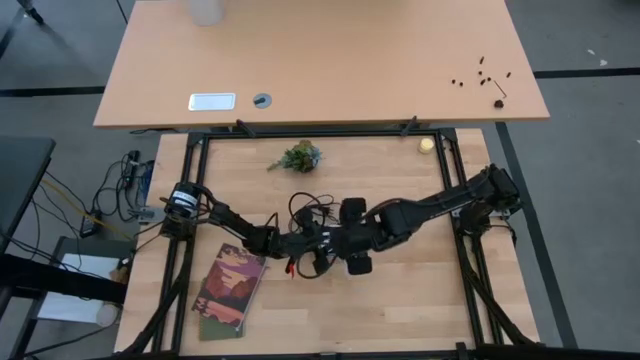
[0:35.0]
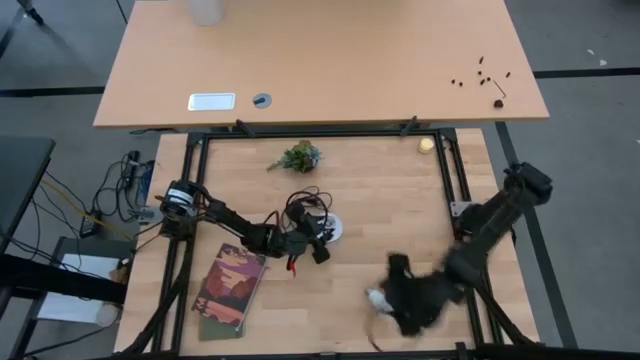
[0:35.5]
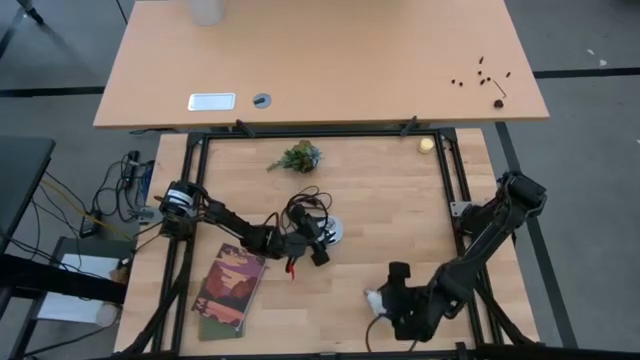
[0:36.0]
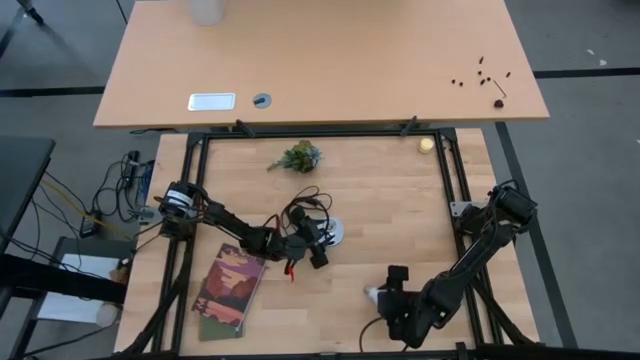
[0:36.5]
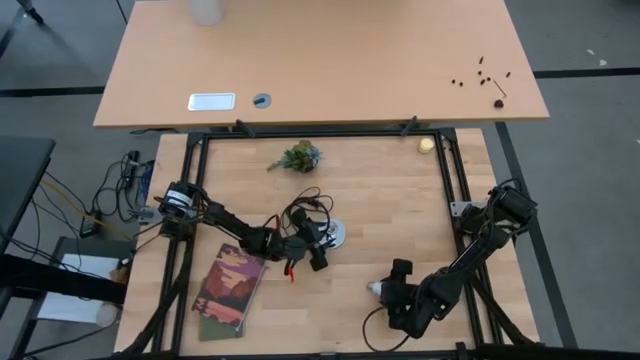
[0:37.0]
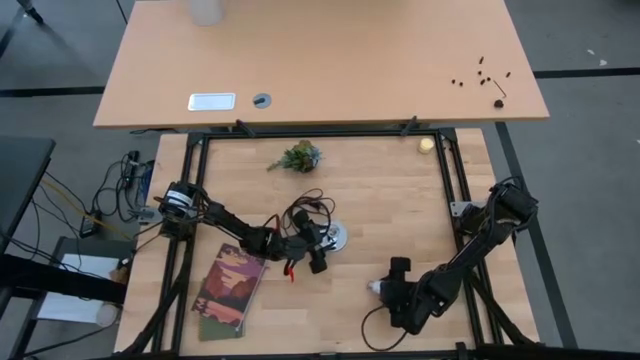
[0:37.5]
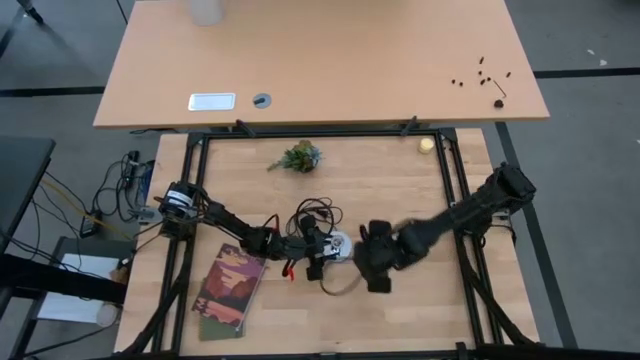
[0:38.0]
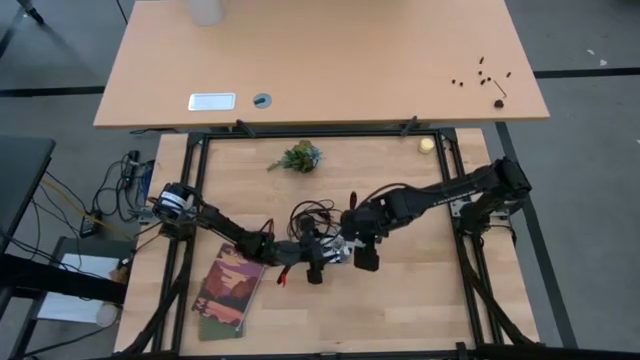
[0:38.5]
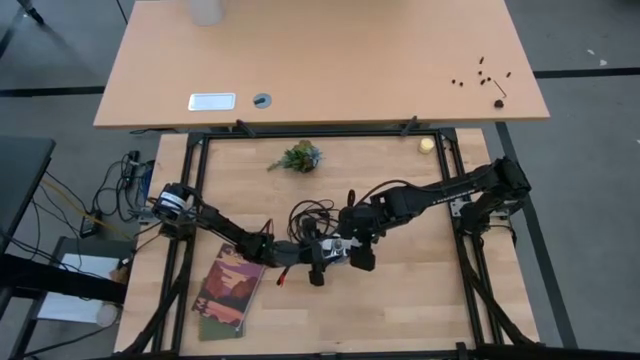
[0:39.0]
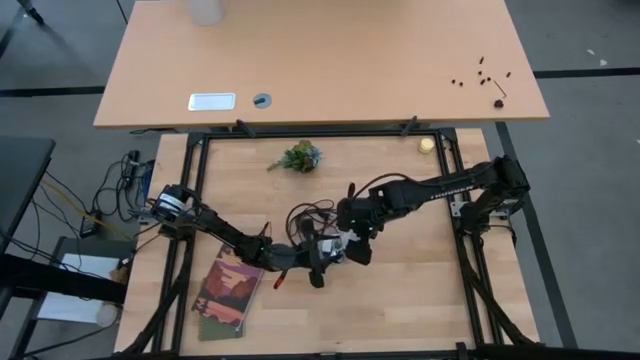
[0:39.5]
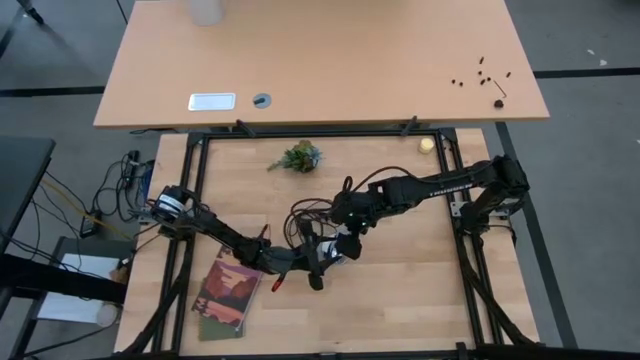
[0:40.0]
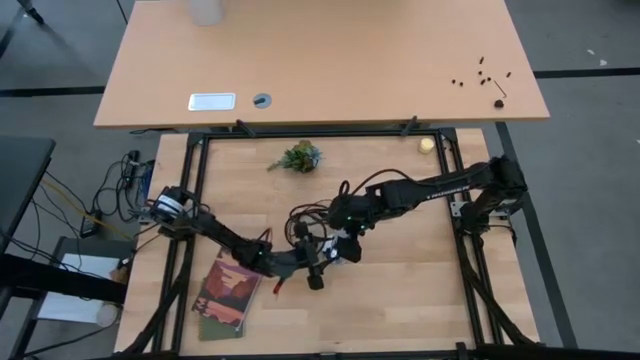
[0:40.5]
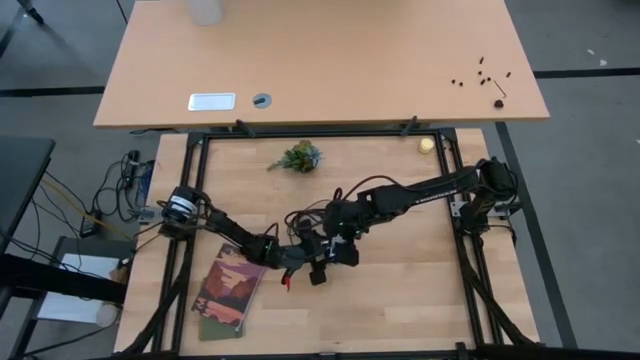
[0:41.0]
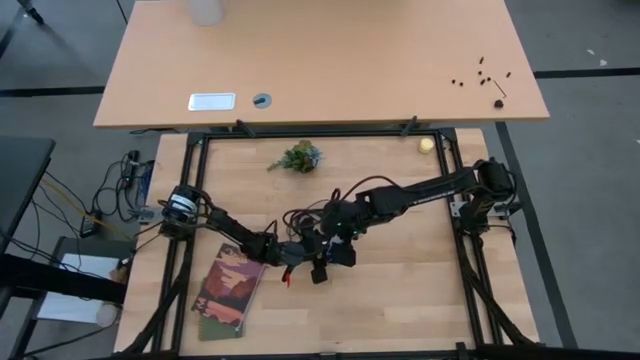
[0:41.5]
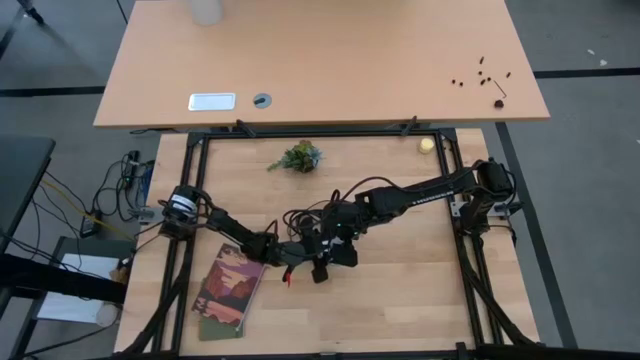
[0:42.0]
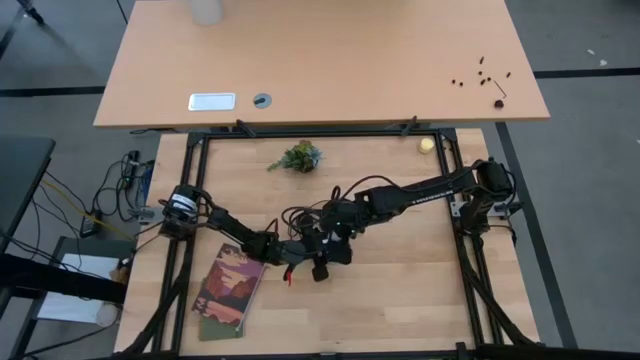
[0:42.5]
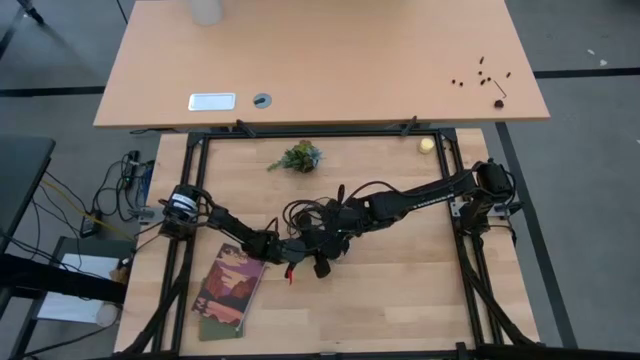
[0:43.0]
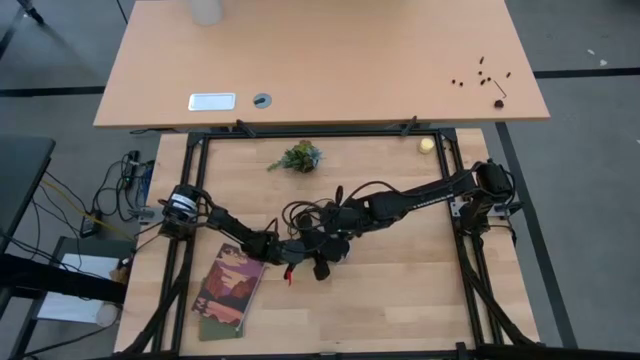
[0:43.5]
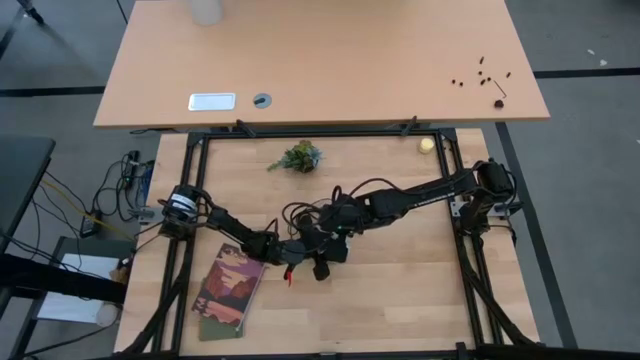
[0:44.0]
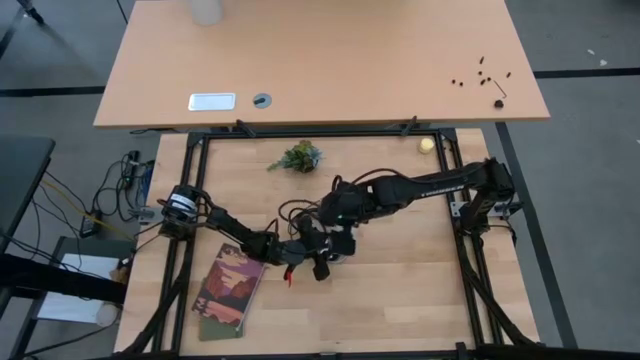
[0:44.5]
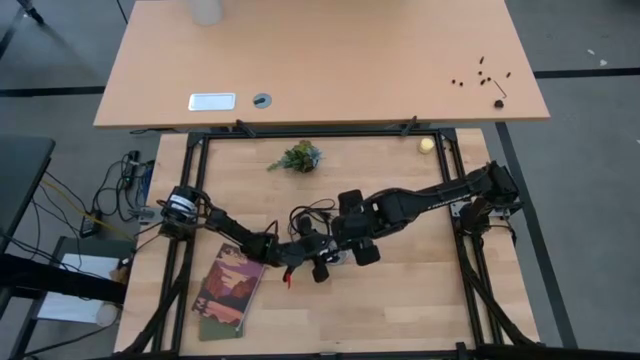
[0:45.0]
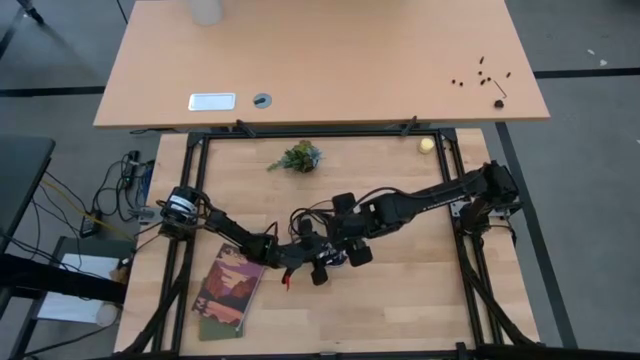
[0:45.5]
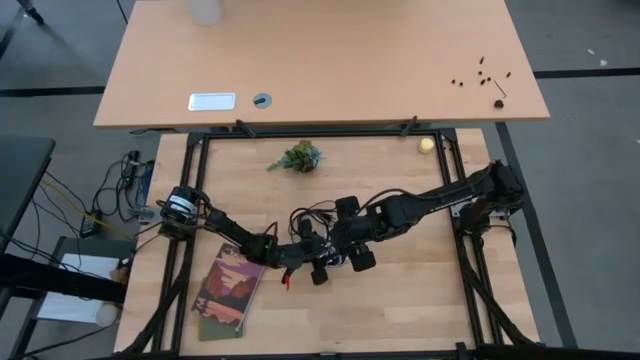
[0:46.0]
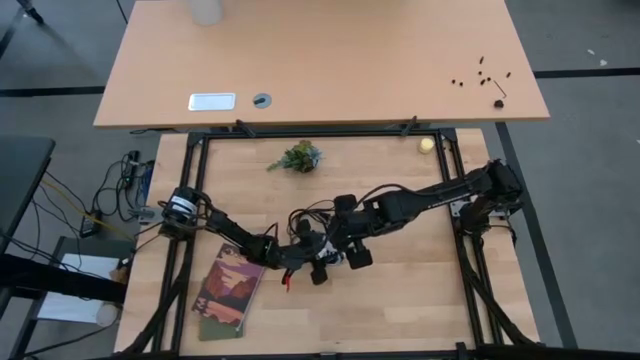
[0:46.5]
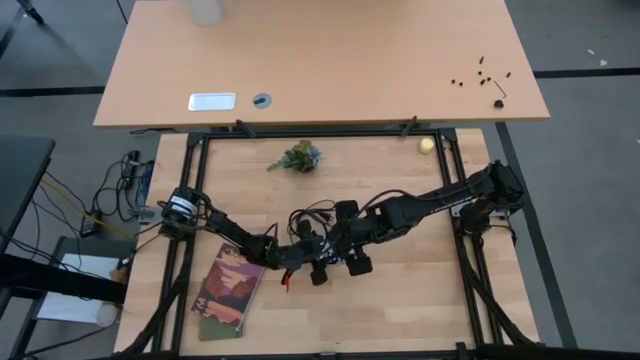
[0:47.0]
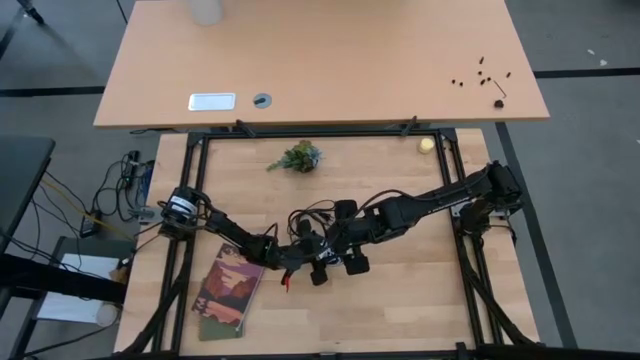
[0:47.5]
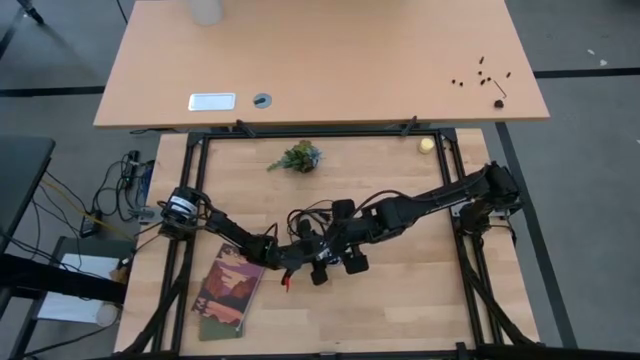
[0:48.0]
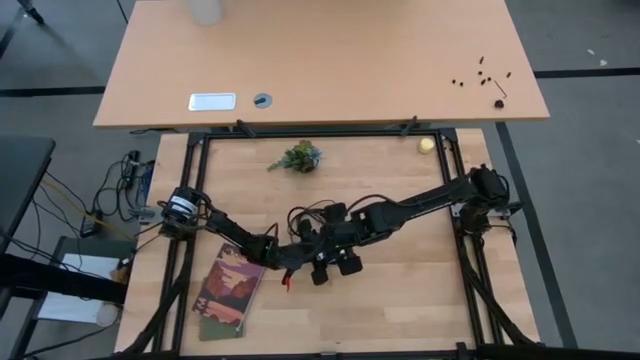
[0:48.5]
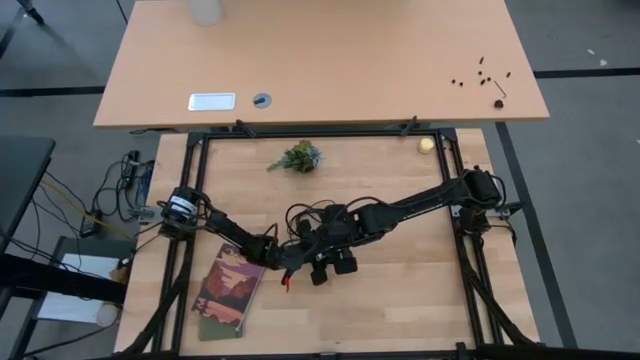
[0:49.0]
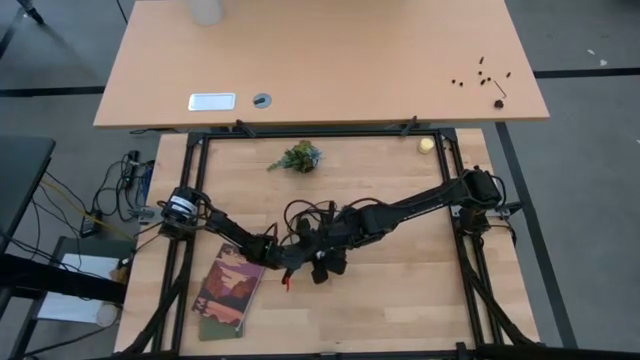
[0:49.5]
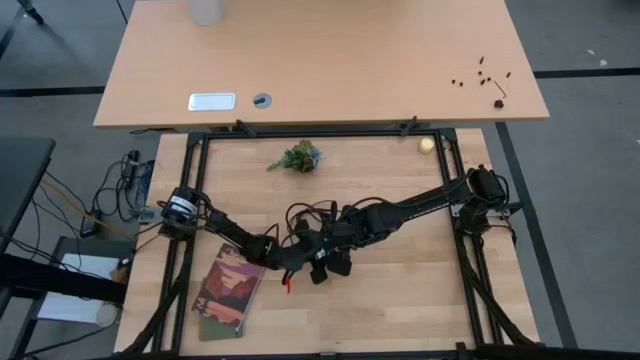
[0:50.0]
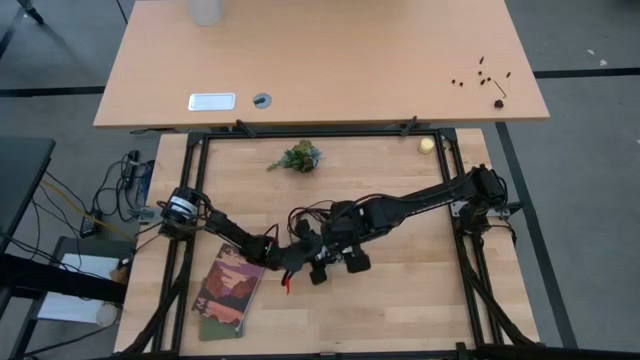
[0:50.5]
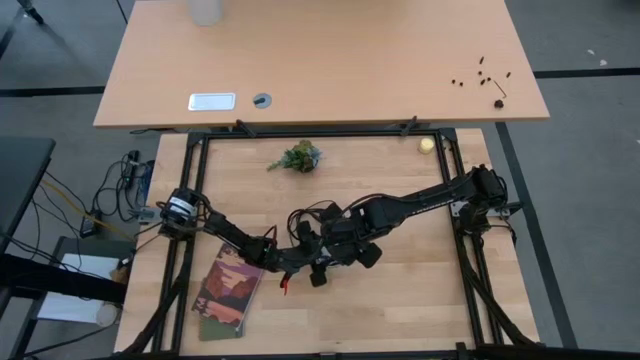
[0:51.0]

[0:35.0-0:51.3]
Task: Screw lightbulb
Insert the white lightbulb into the lamp socket
